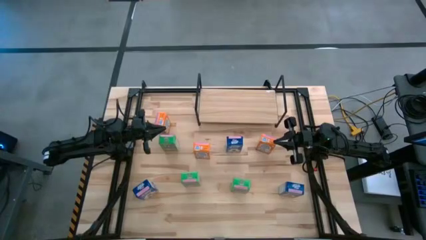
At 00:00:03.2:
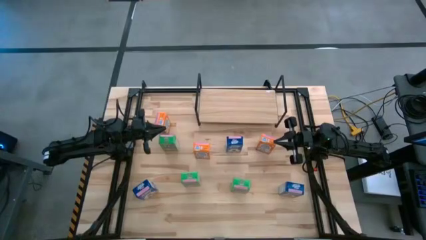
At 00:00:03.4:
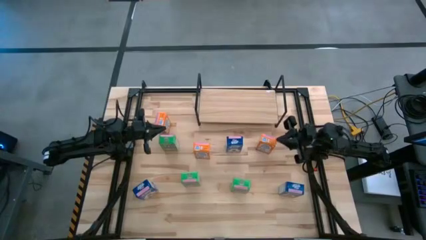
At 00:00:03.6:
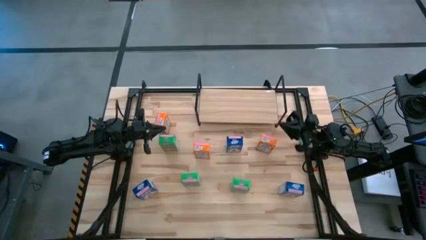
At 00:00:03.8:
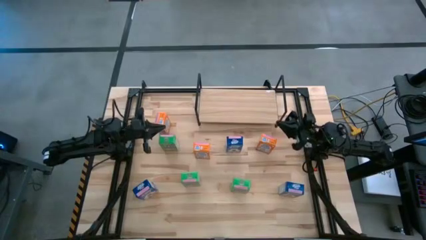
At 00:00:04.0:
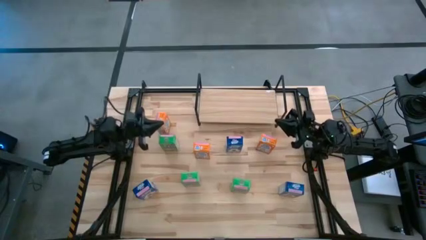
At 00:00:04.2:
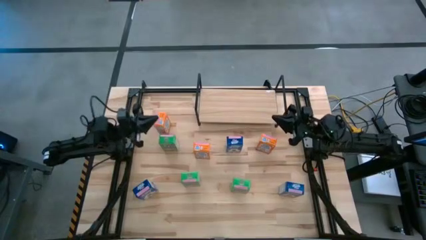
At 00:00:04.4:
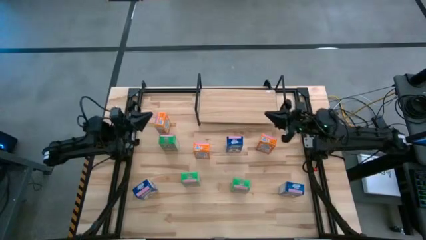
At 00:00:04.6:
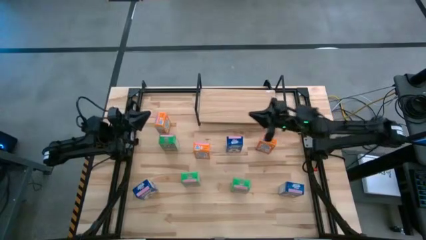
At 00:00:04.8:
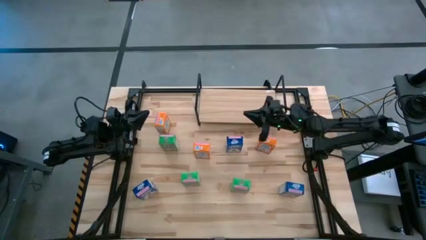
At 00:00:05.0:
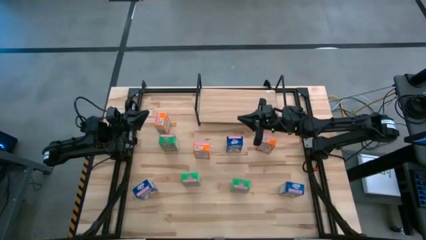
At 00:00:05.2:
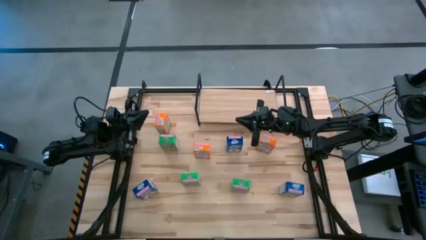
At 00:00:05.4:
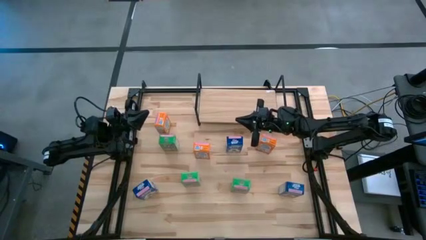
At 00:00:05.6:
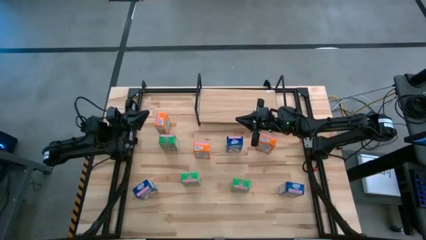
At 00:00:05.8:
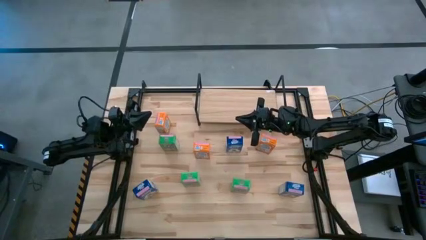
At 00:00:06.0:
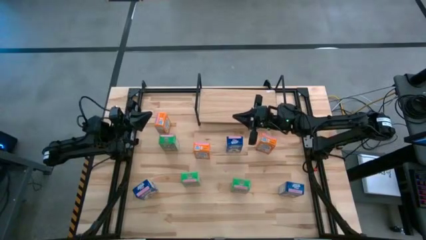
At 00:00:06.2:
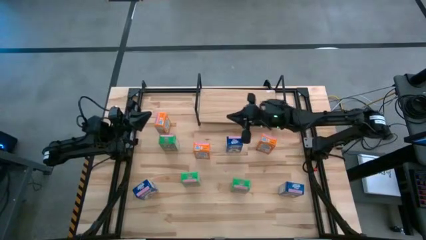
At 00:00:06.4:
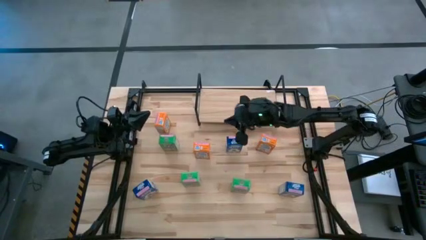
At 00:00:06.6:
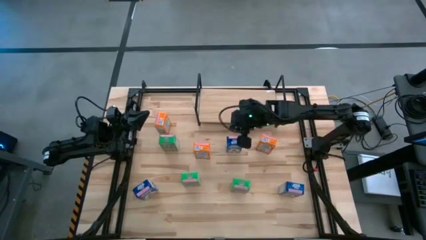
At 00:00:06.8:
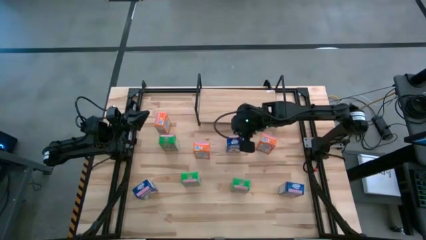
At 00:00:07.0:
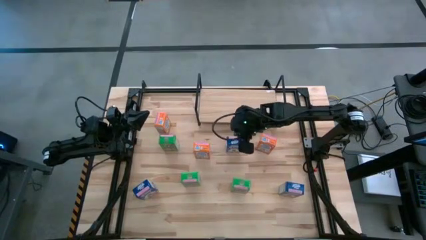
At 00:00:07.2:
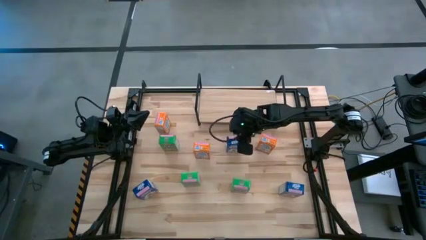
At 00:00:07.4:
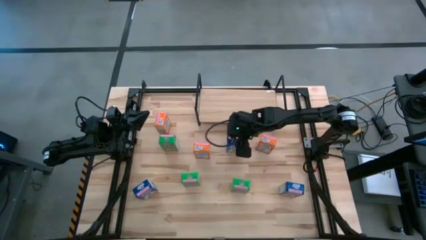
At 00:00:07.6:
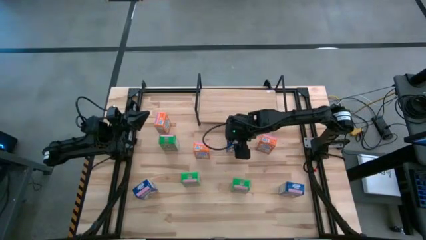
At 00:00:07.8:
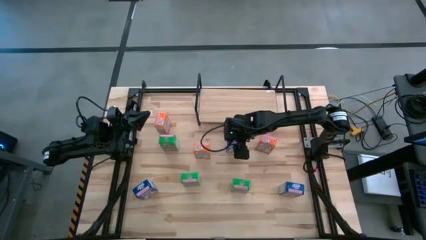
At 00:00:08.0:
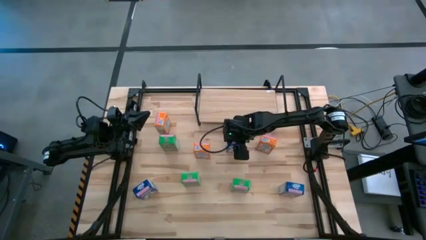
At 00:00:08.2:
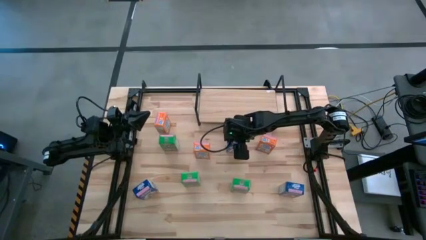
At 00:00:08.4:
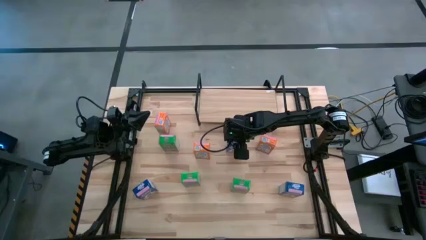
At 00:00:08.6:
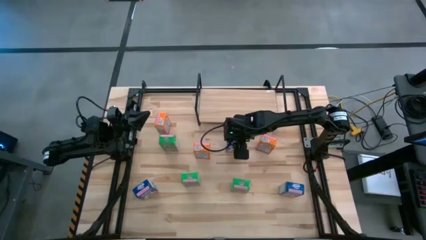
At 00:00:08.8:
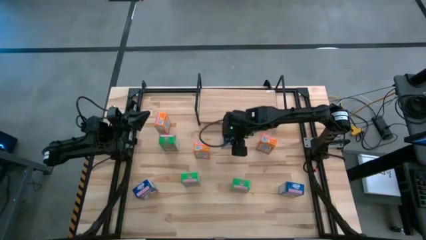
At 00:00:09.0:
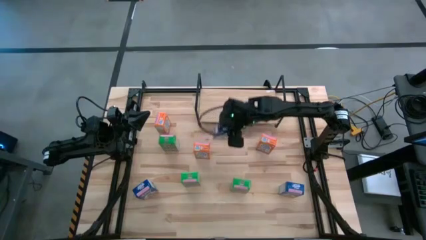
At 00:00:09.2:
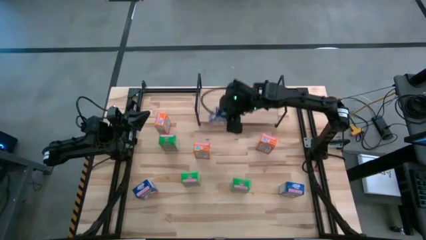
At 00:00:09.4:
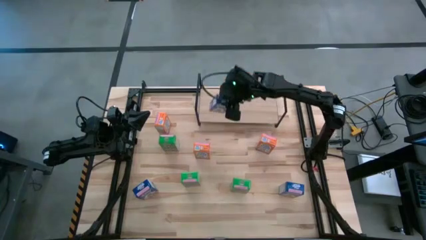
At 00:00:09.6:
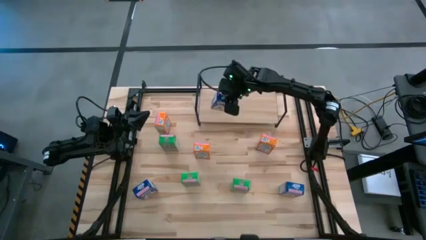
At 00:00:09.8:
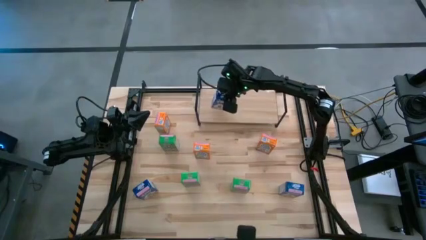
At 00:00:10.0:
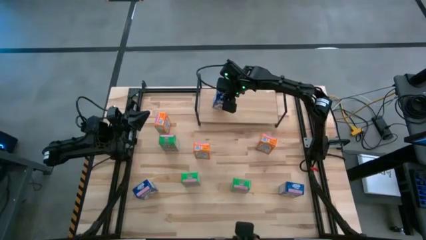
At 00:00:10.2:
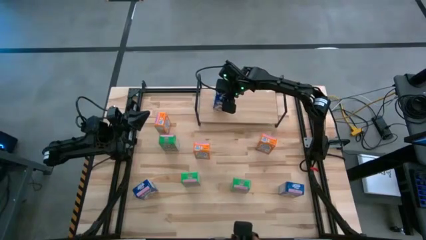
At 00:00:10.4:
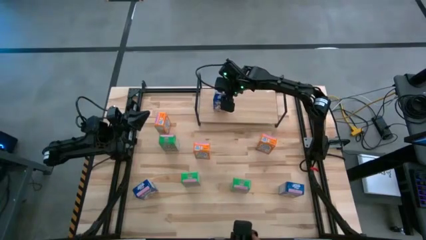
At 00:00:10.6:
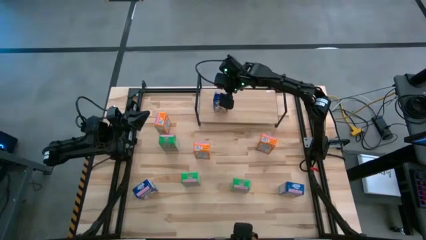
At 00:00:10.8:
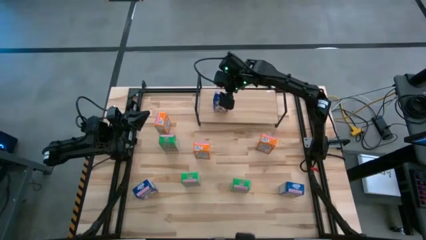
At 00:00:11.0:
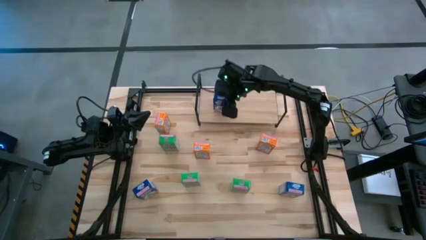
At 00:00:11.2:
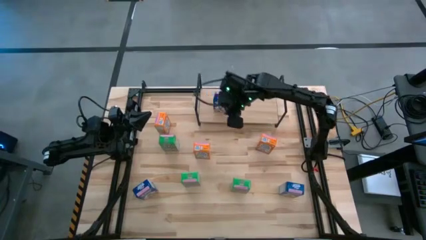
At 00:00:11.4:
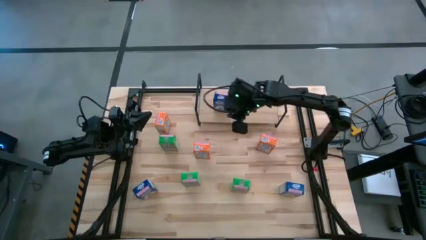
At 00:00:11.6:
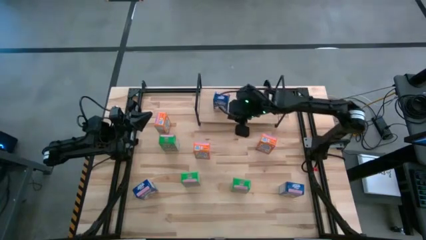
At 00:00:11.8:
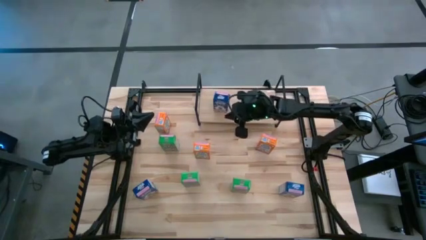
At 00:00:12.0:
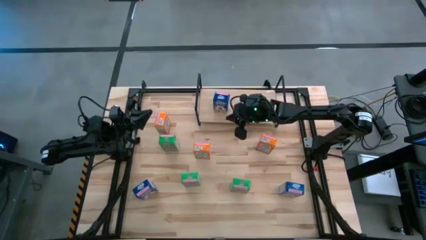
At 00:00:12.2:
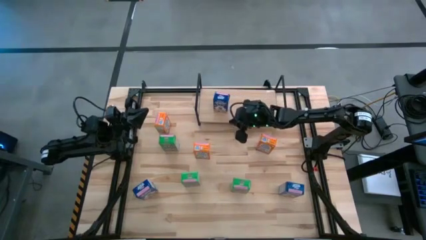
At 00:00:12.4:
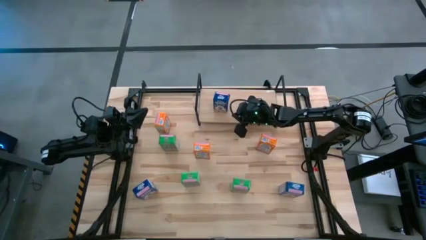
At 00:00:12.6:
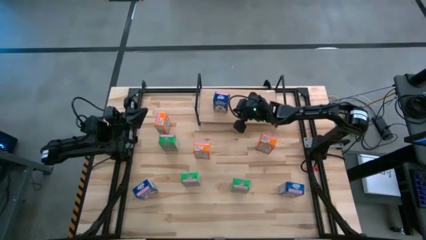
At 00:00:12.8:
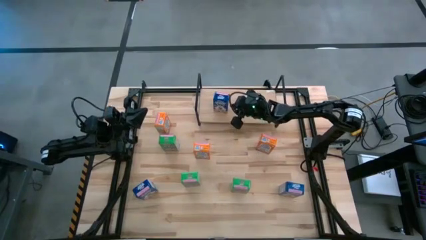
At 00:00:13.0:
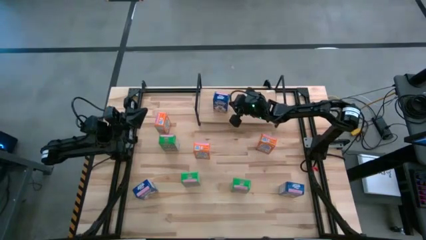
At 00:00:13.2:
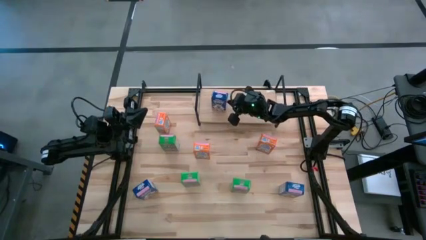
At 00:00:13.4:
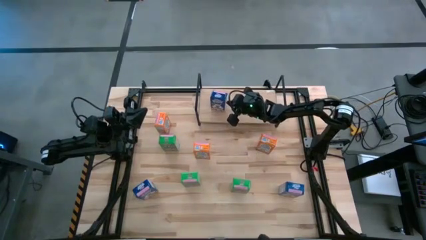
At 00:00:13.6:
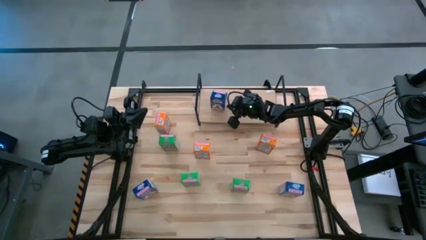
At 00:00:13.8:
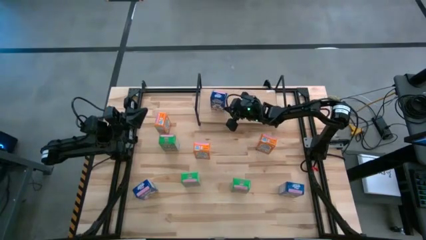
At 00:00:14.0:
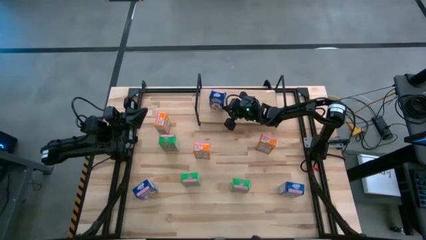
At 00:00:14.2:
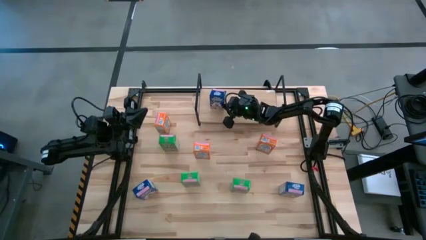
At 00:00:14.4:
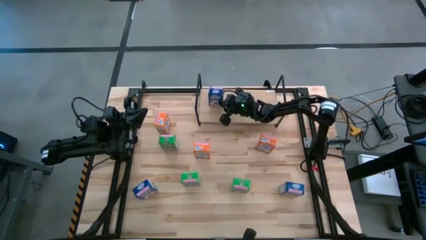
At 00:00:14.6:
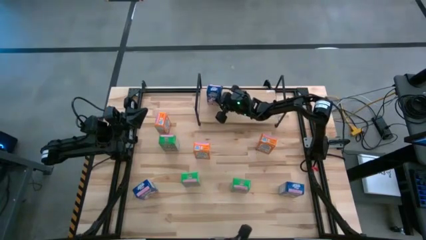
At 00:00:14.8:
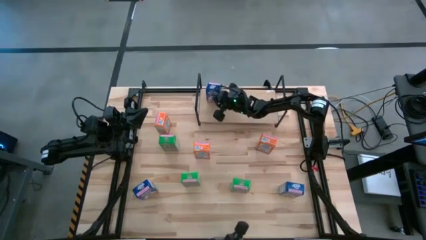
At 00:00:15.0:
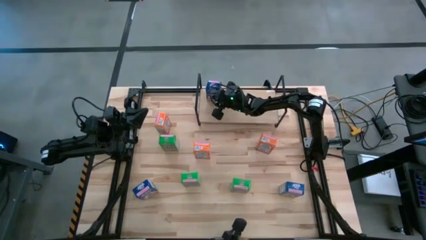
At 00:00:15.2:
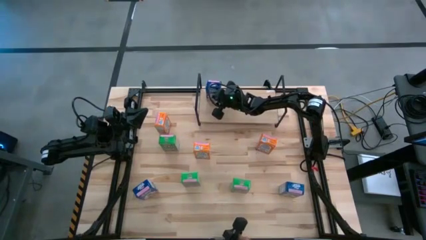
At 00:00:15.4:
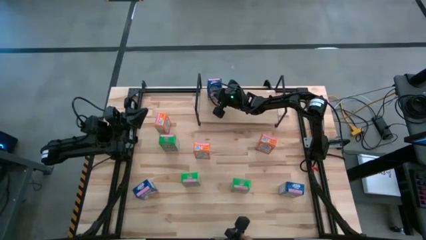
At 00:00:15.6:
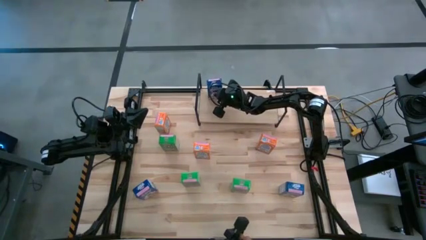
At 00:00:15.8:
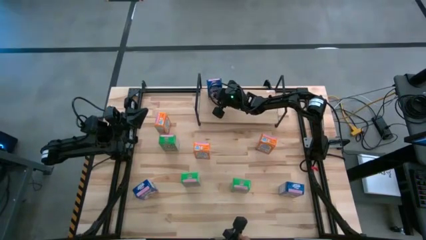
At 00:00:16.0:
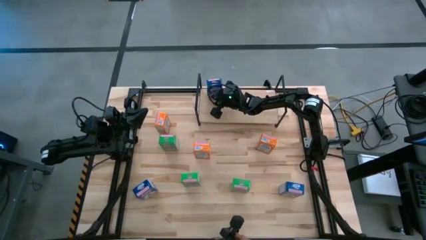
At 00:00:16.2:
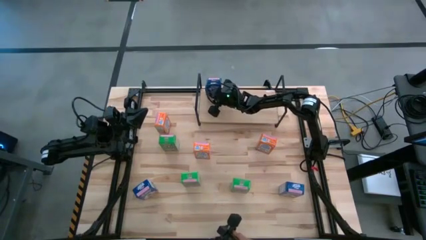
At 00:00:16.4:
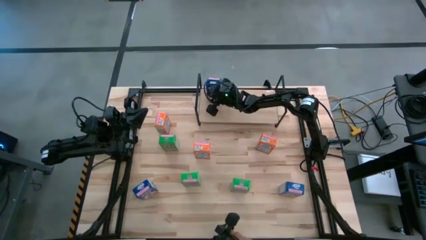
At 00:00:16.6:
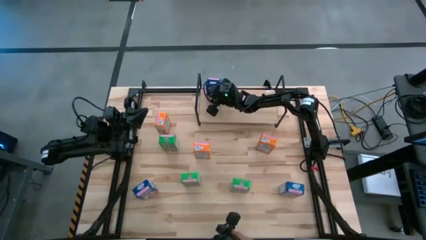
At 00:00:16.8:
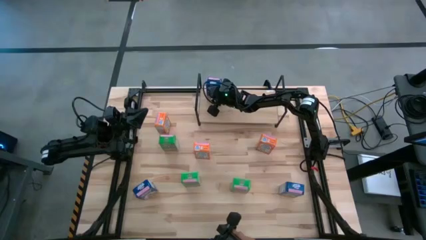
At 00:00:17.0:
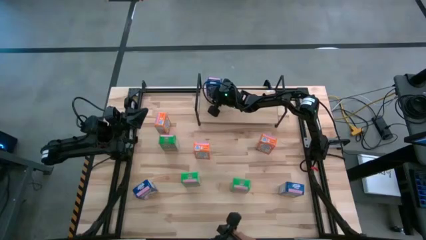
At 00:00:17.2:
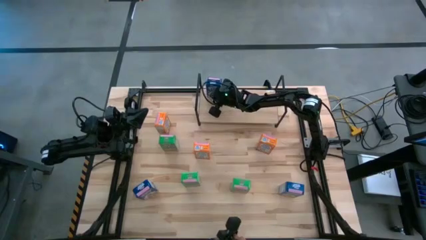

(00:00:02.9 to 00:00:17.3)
Task: Stack cereal on shelf
Put the top blue cereal box on the shelf
